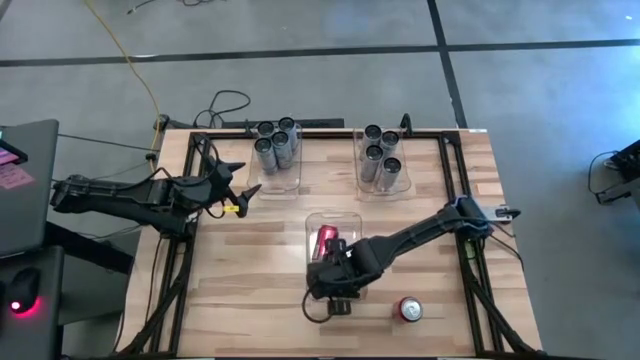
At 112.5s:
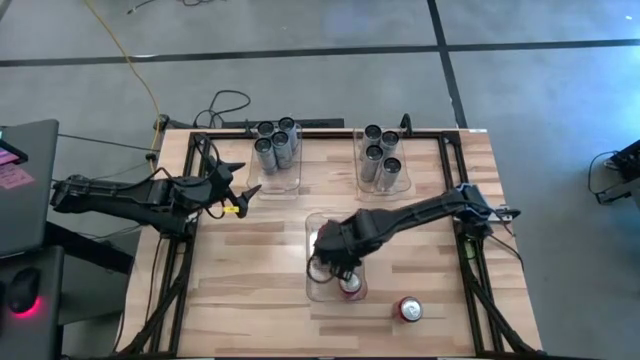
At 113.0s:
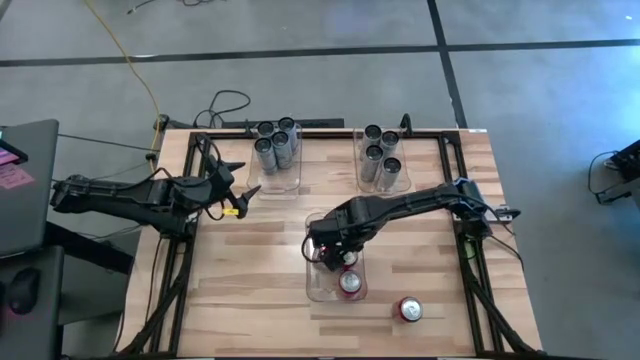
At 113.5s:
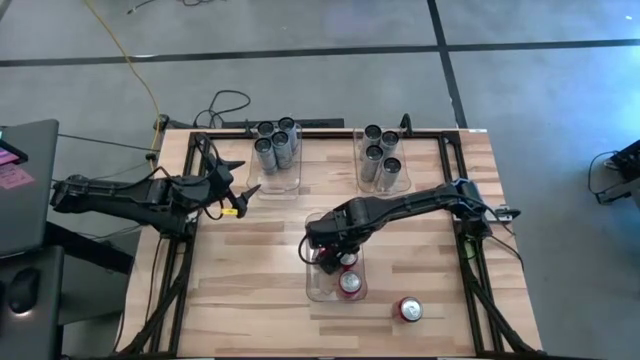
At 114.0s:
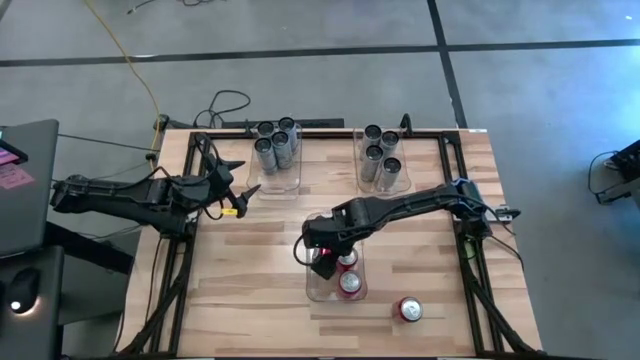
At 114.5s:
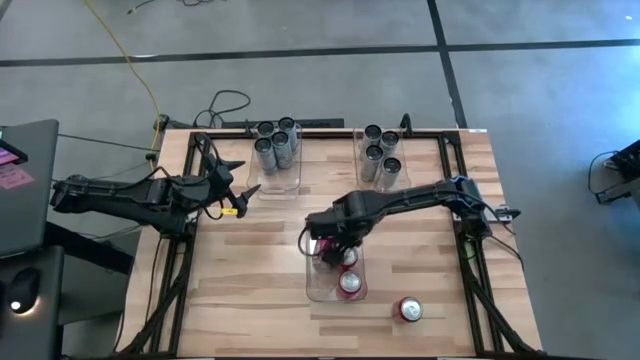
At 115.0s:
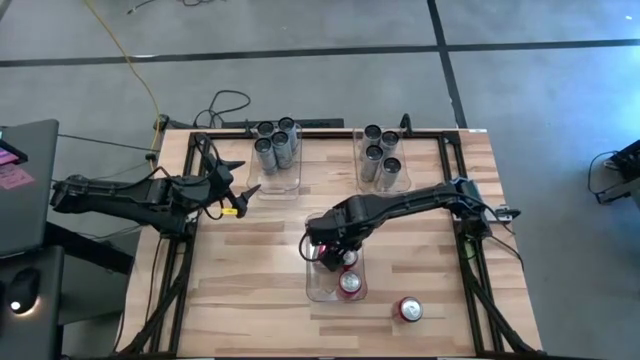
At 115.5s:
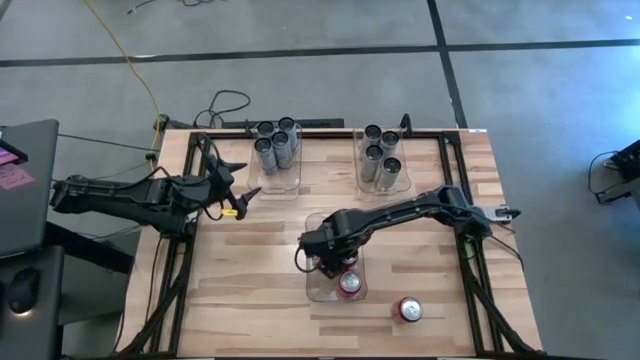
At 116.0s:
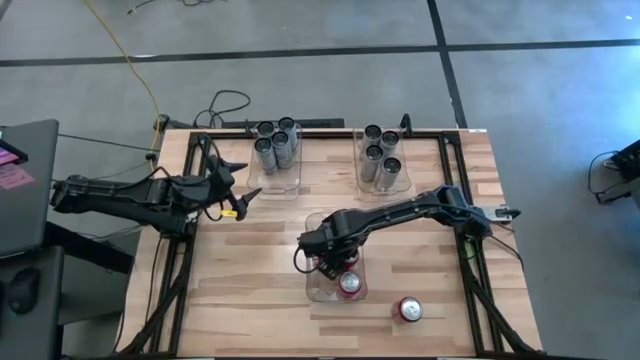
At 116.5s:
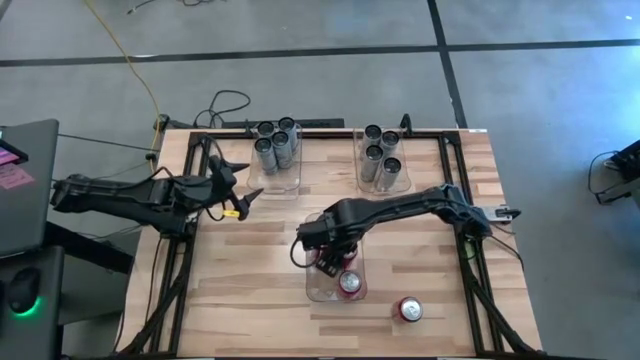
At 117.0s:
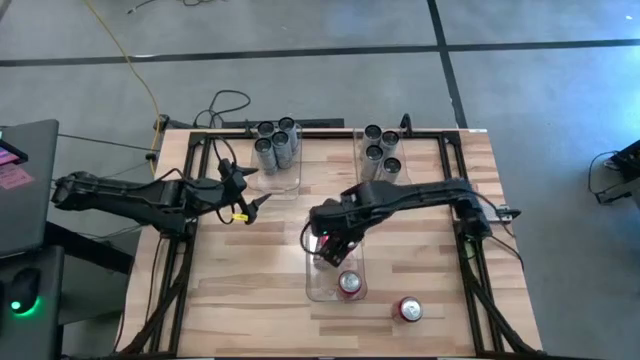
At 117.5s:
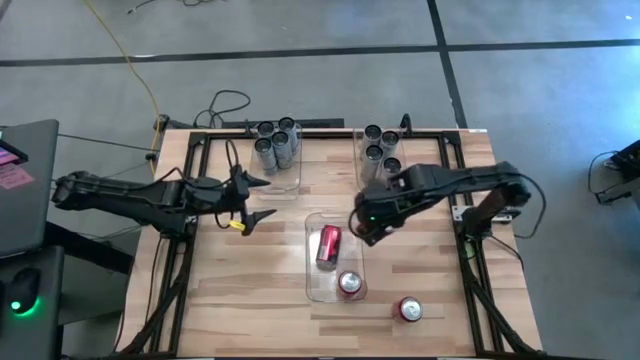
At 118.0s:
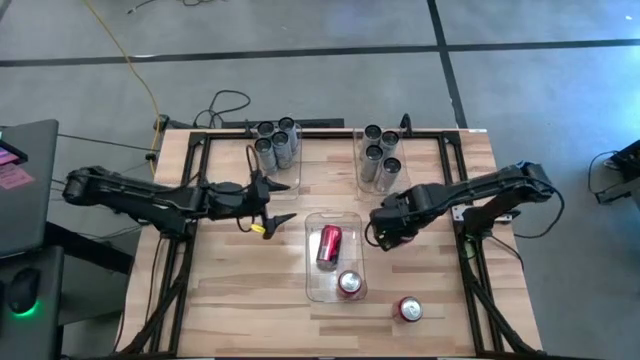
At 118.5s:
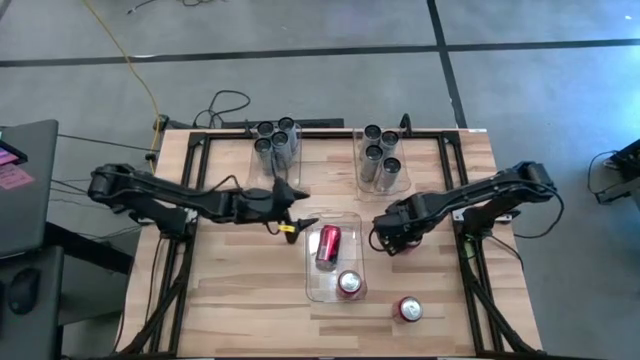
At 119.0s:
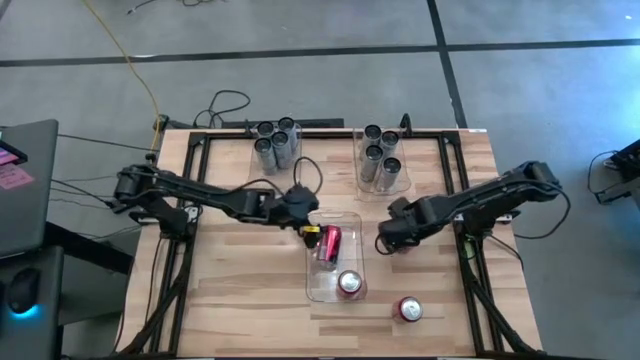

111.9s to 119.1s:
Task: Sort soda cans
Remove the red soda can from the center transparent bin

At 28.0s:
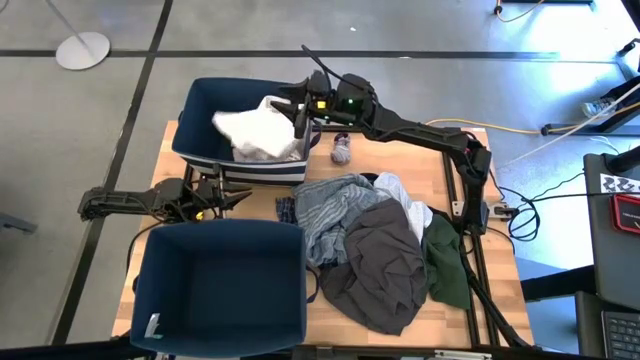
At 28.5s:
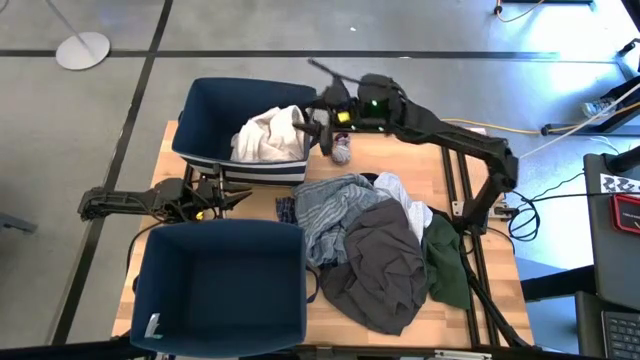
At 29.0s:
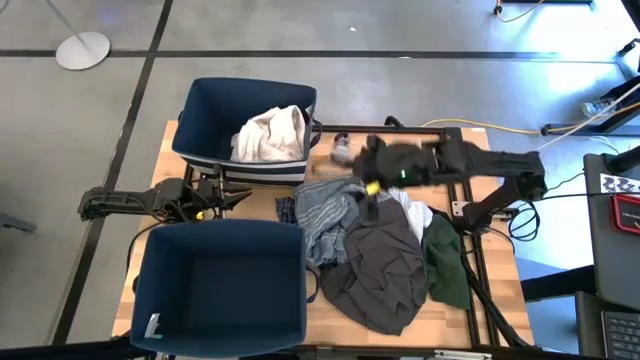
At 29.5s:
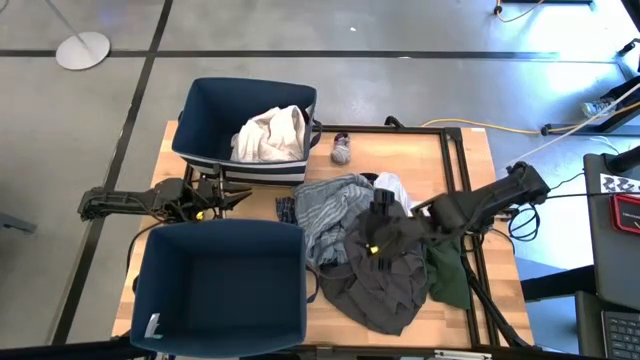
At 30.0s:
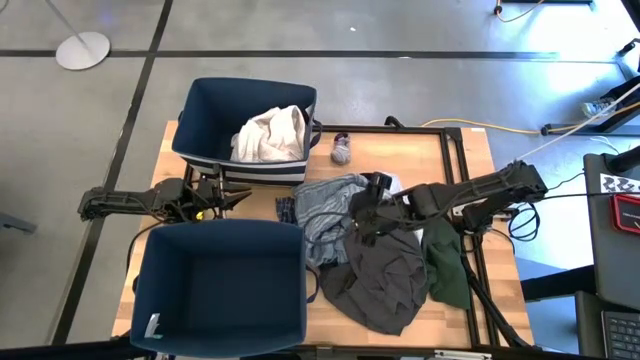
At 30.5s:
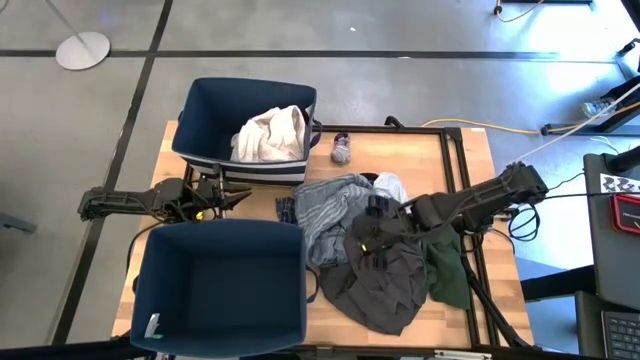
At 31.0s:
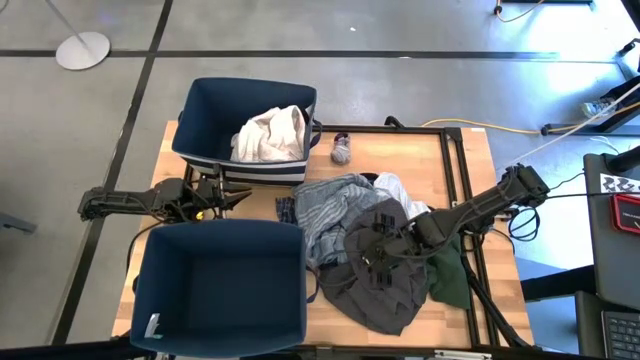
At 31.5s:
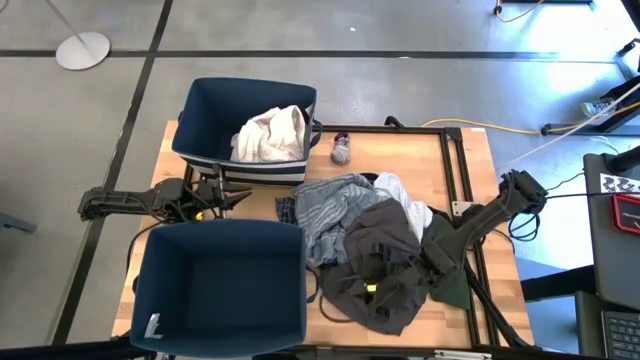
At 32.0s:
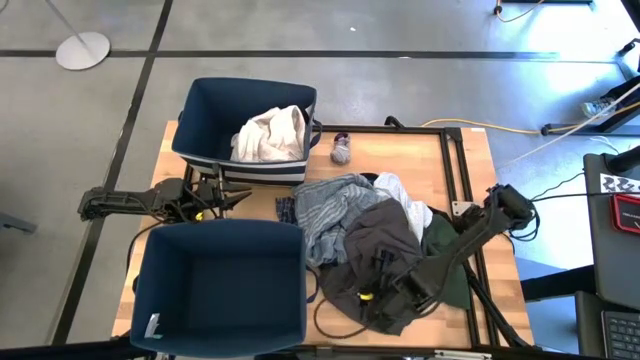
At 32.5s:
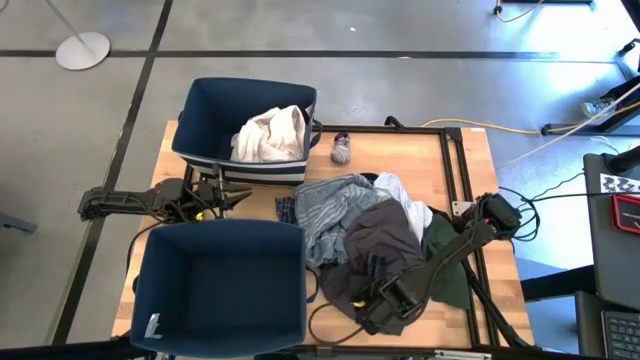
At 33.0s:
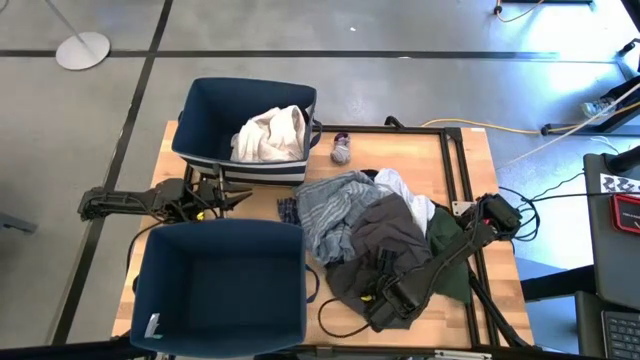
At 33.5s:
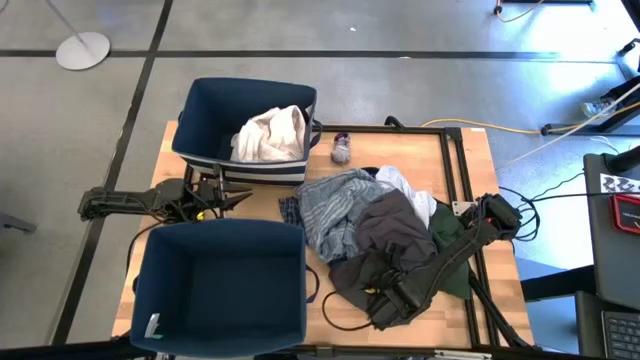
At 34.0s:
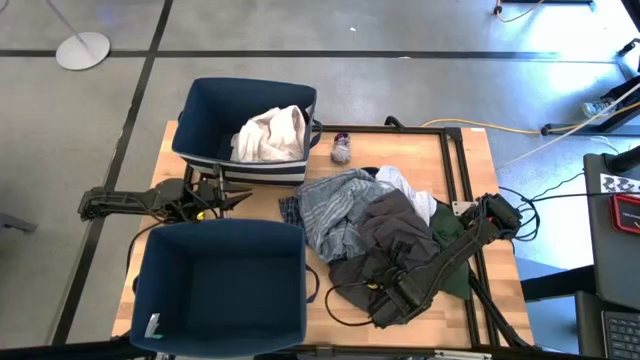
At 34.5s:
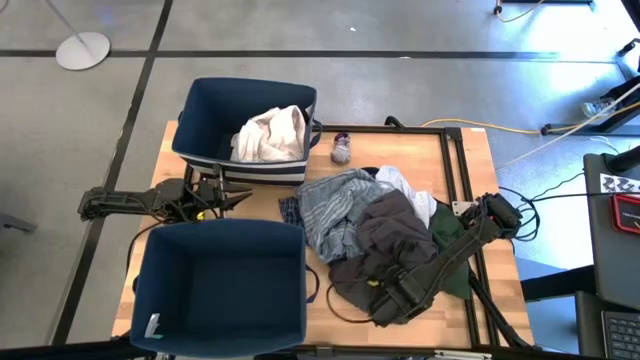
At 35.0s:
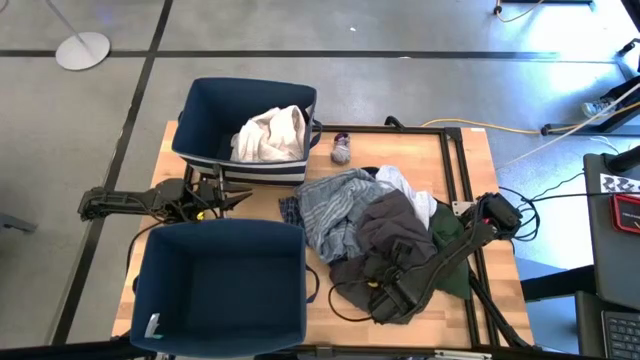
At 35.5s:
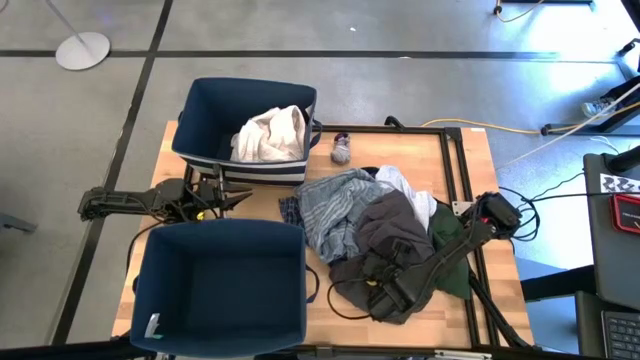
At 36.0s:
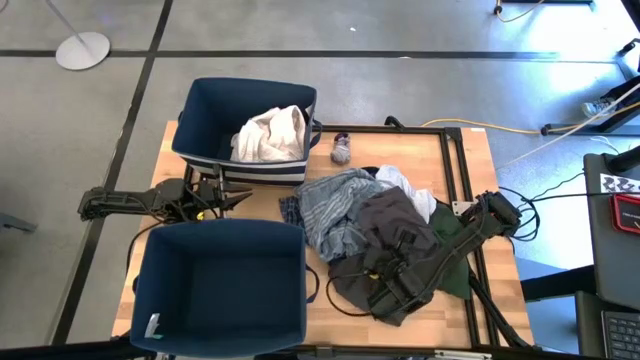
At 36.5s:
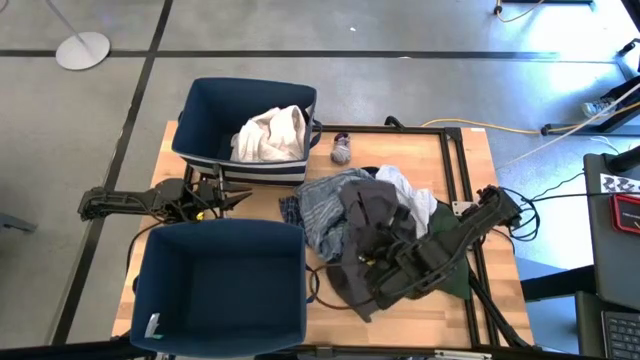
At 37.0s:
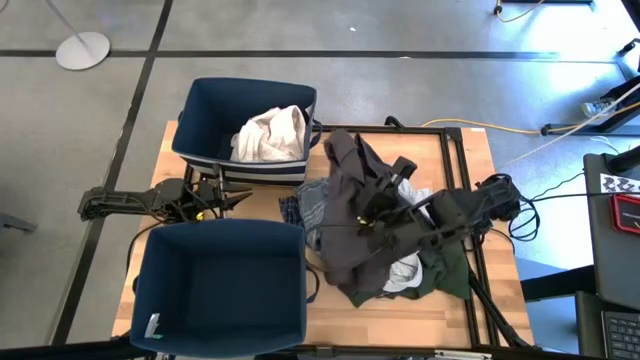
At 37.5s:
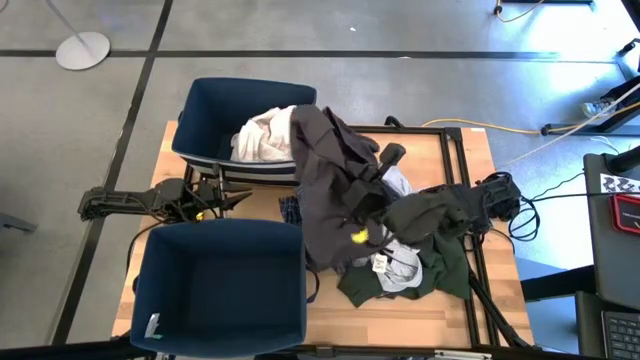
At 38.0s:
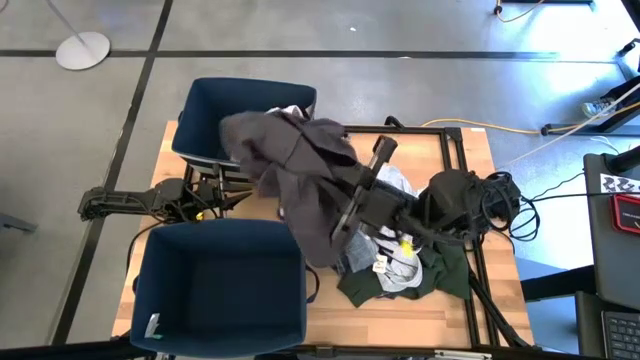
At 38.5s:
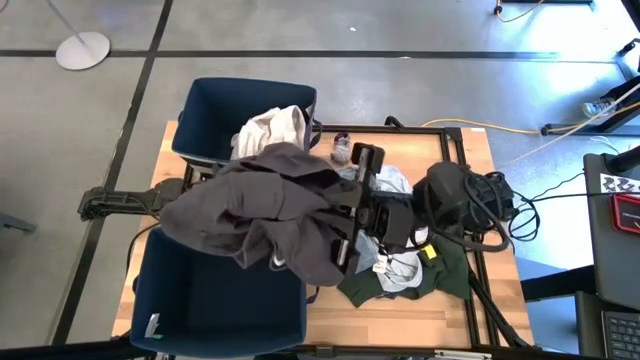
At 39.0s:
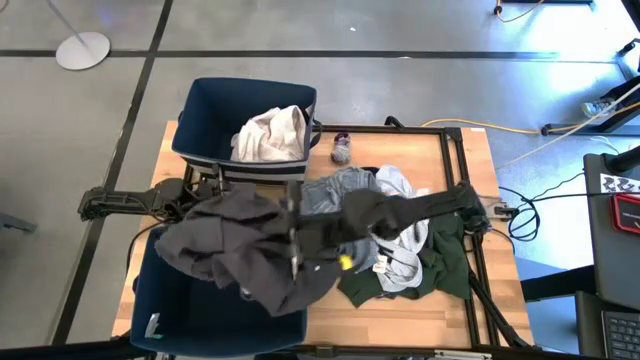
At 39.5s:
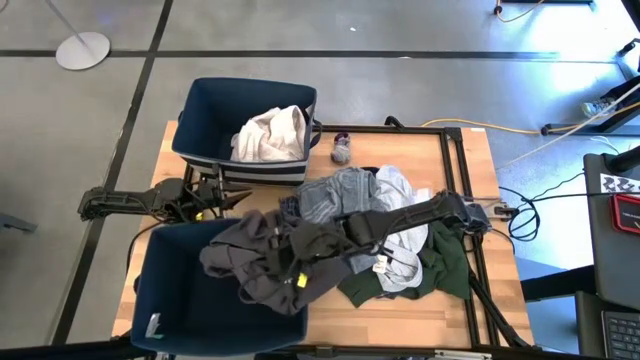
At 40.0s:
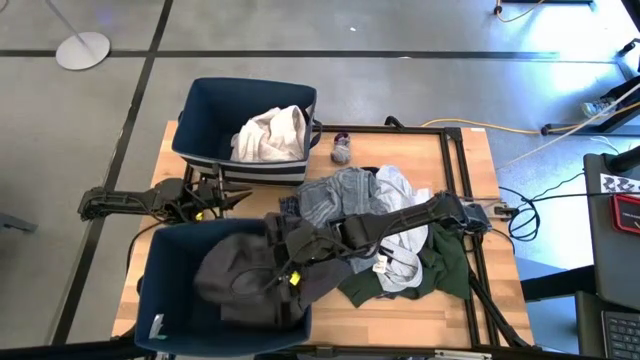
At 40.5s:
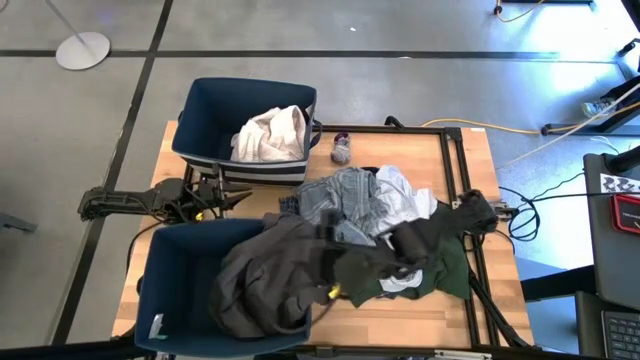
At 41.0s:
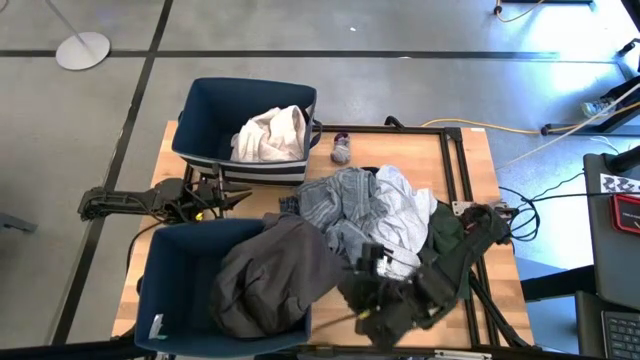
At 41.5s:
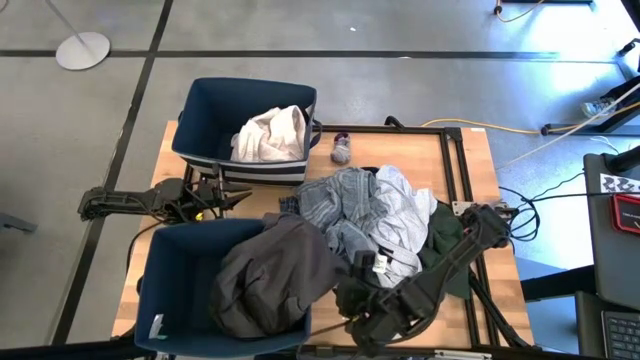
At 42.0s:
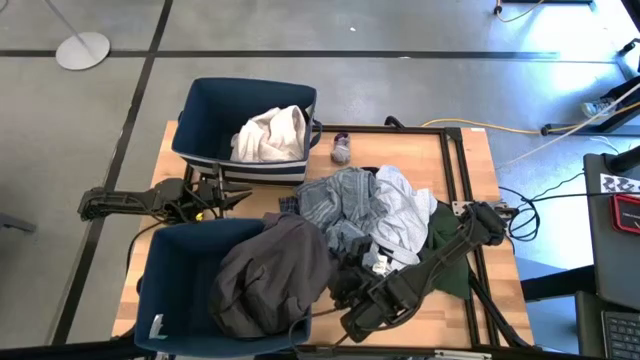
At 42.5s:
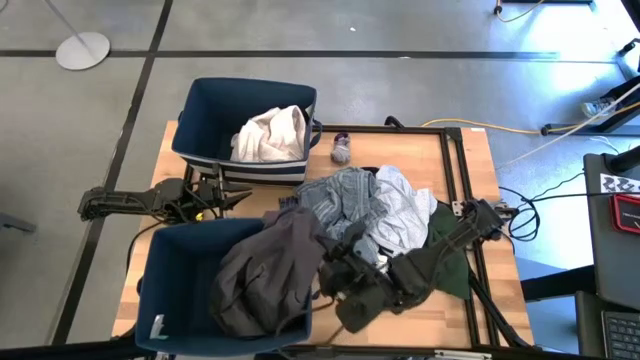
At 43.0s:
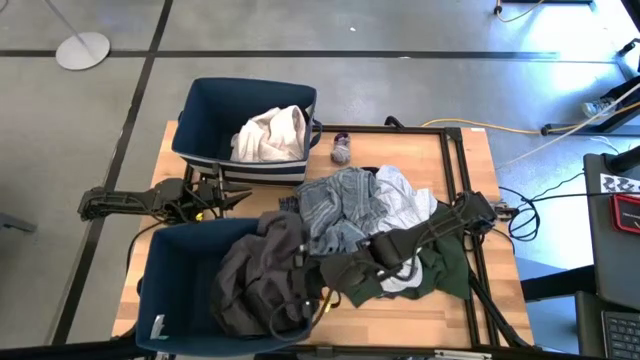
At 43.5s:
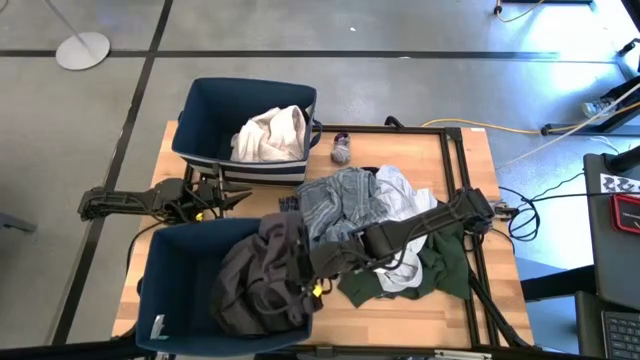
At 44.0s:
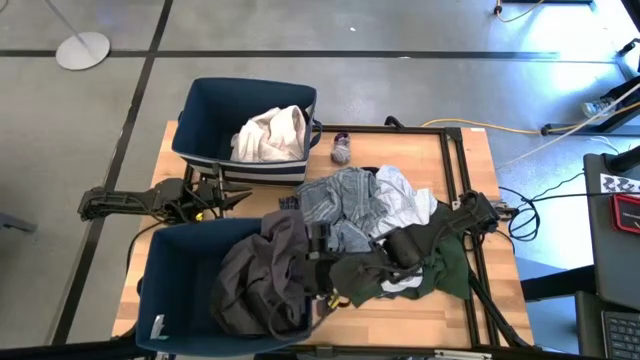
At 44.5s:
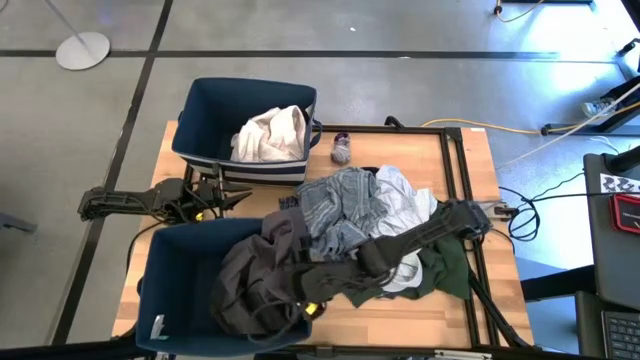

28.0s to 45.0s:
Task: Sort clothes
Put the gray short pants into the bottom blue laundry organizer
